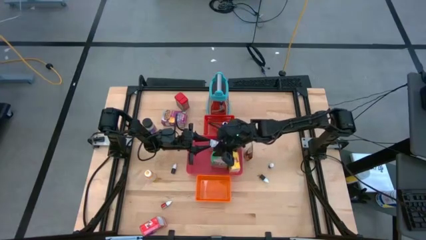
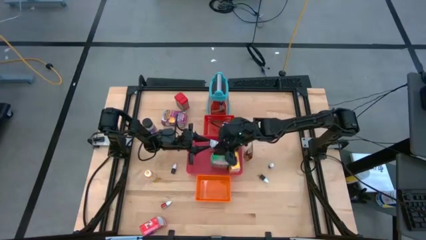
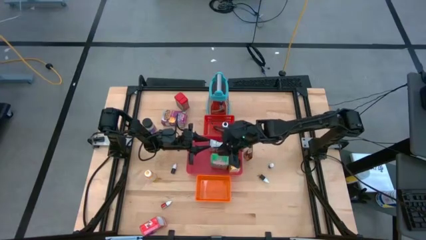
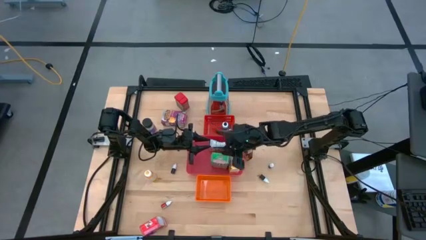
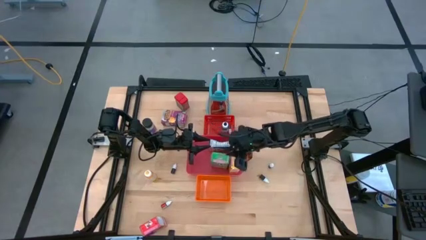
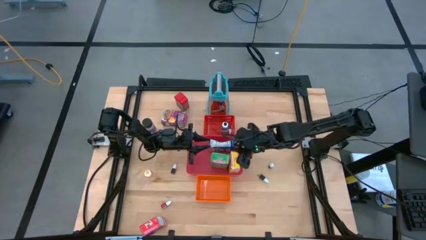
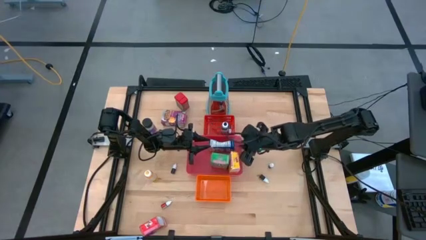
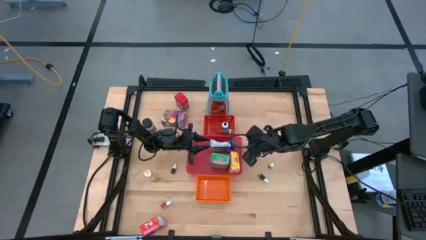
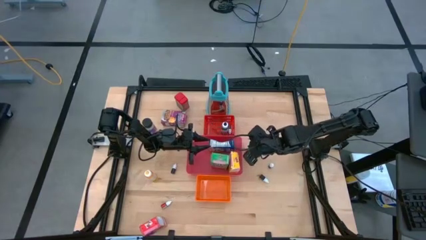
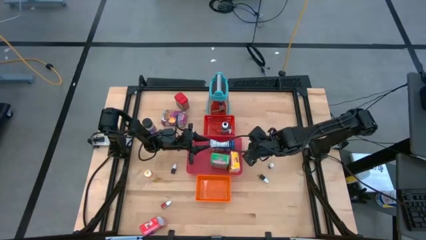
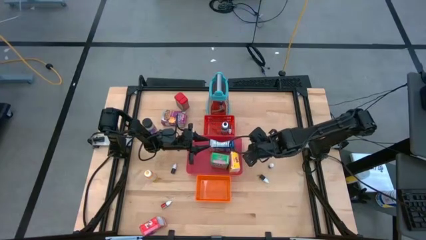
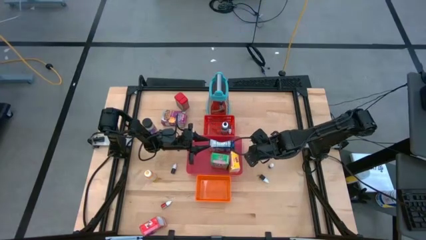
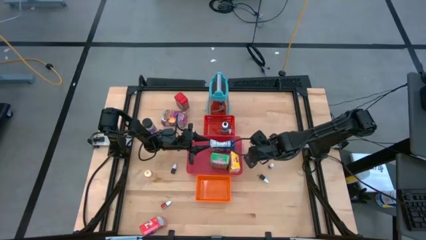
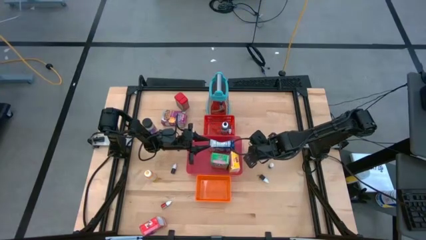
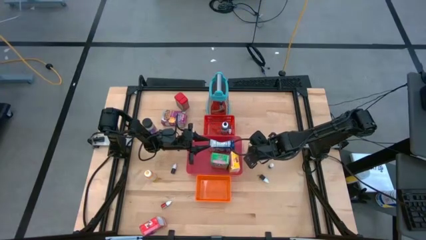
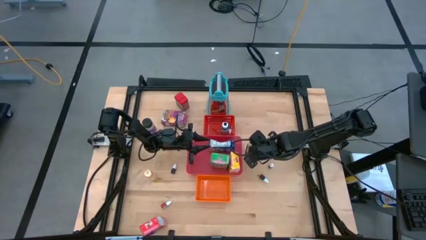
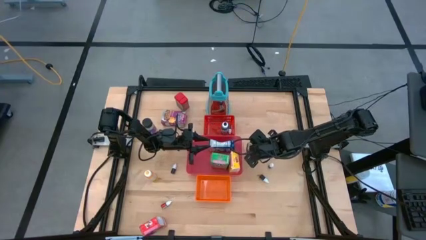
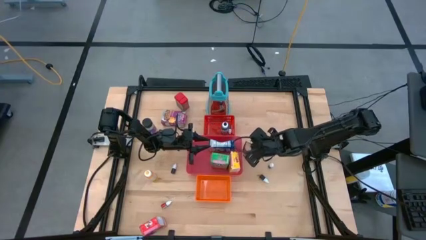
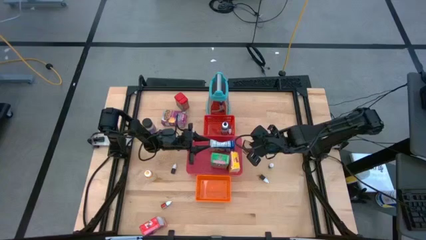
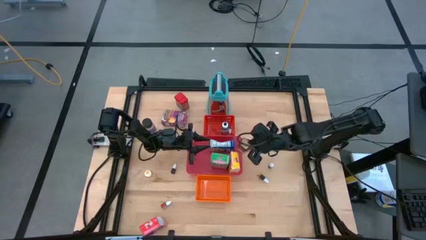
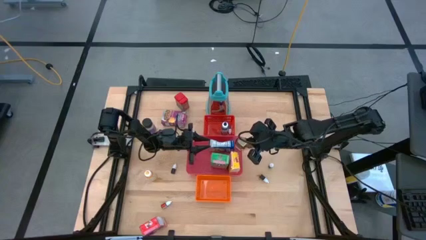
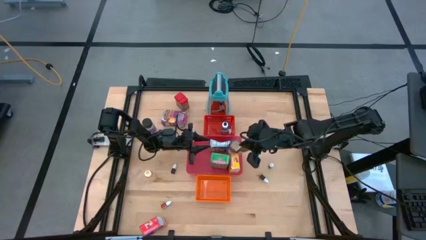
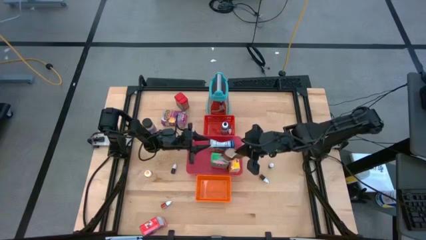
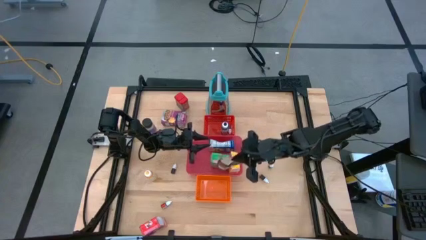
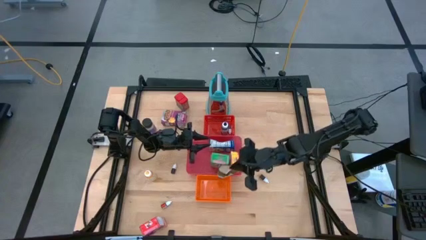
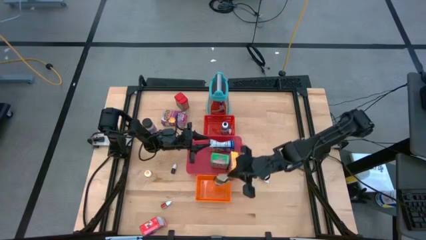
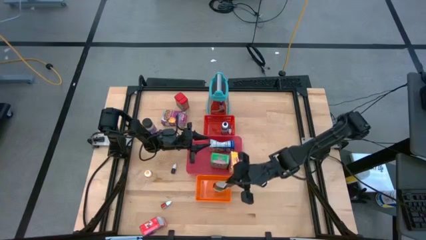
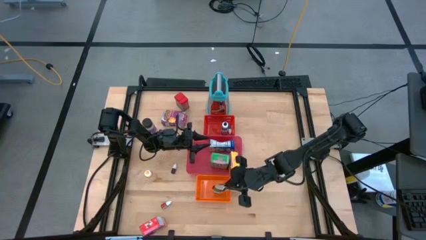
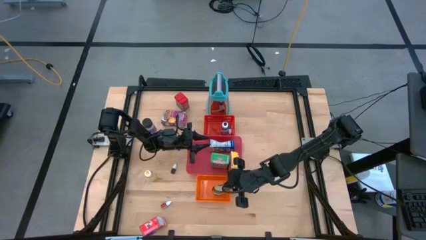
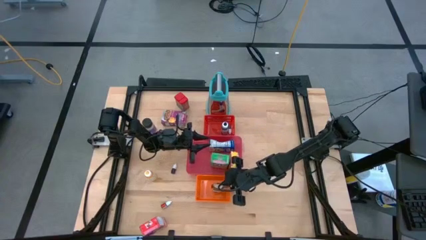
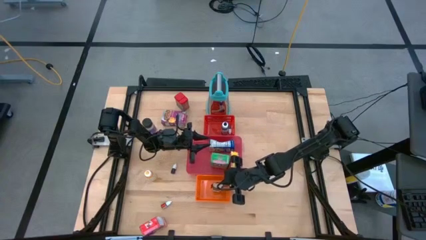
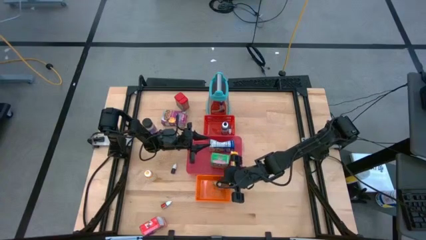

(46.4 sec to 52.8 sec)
Task: Pick & Place Kitchen Items
Put the orange seasoning bag into the orange bin

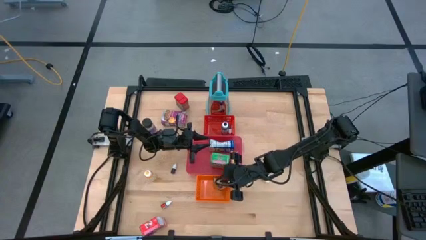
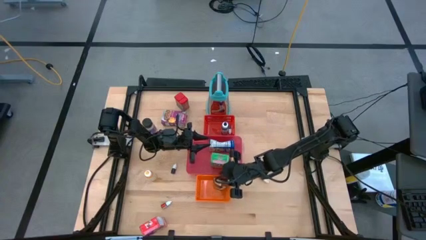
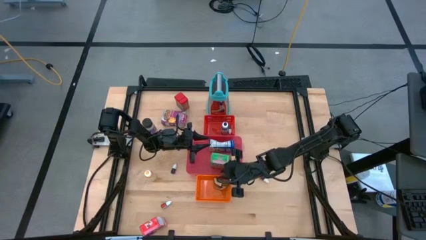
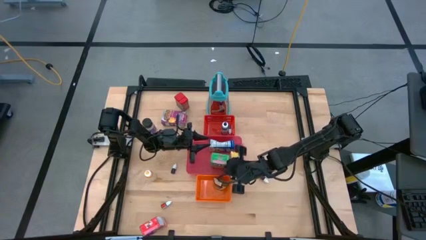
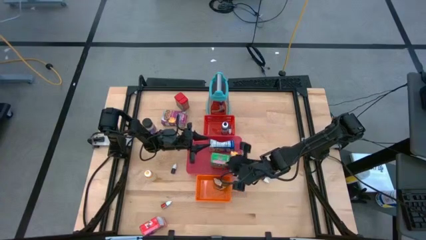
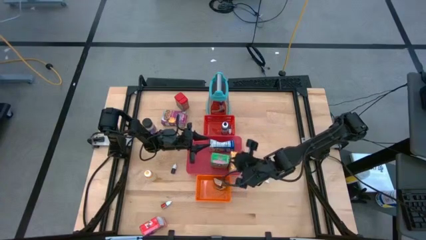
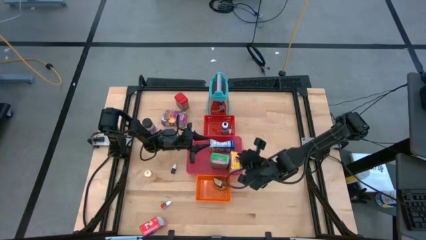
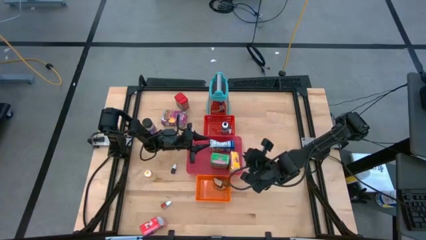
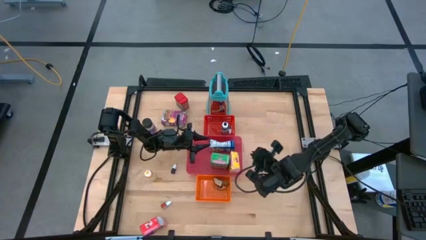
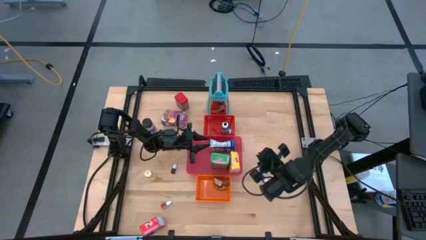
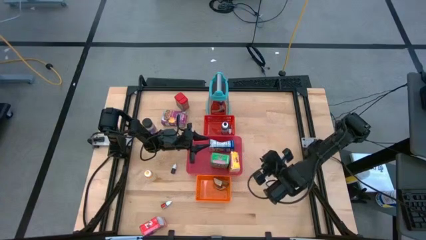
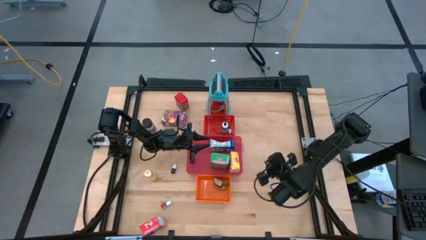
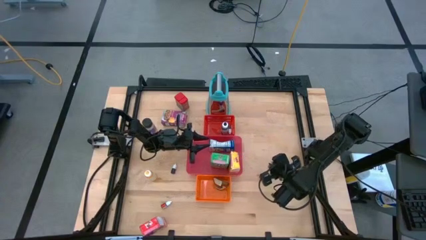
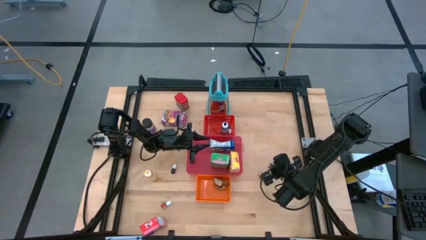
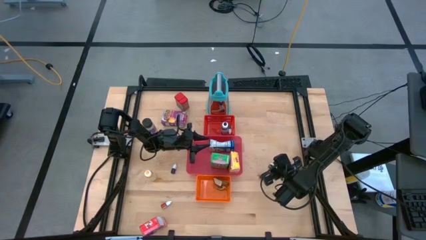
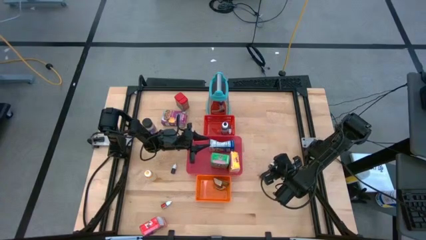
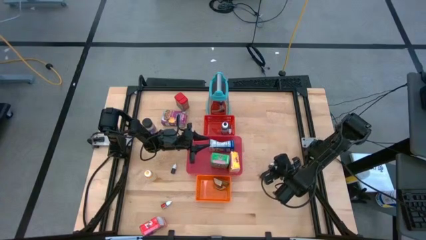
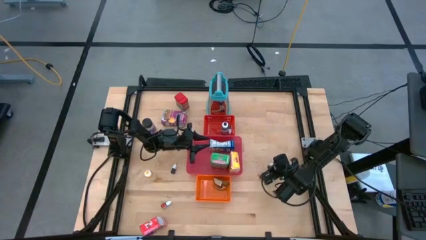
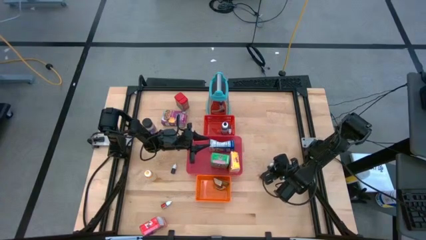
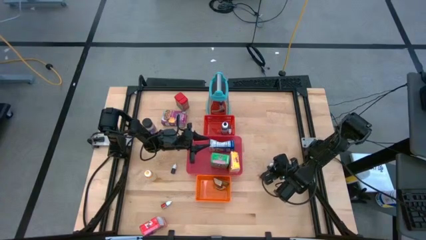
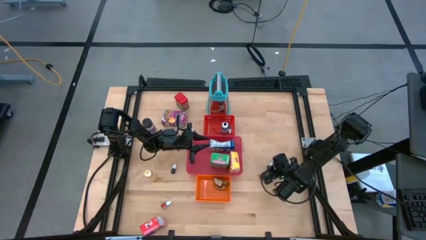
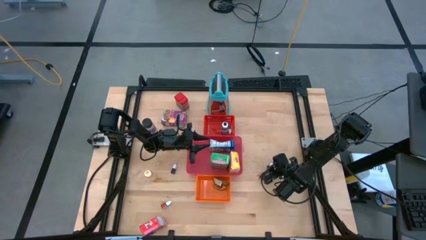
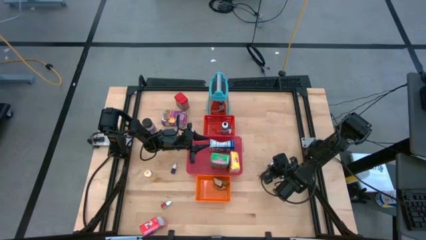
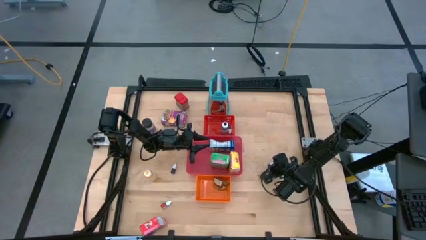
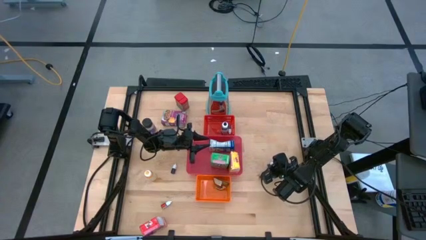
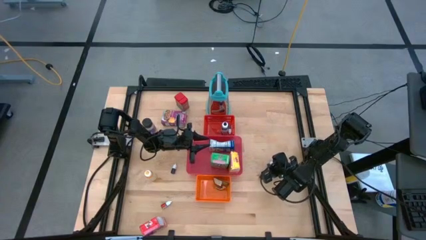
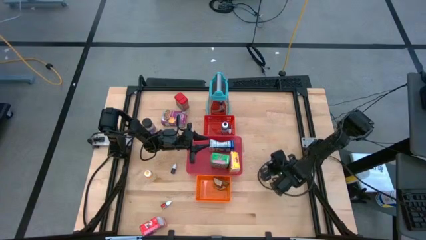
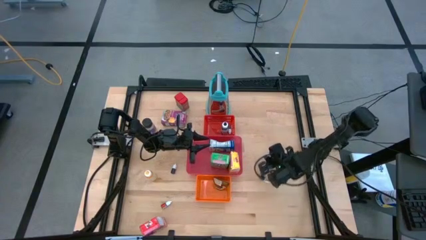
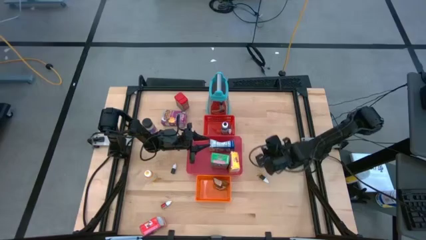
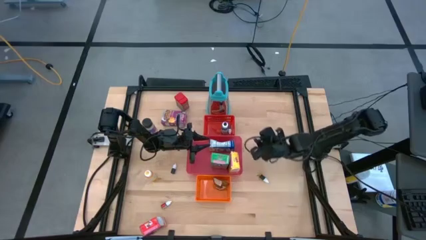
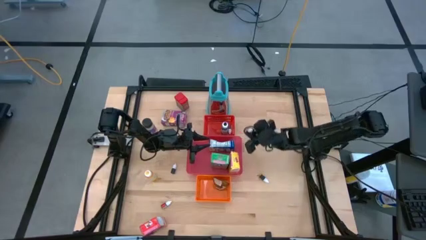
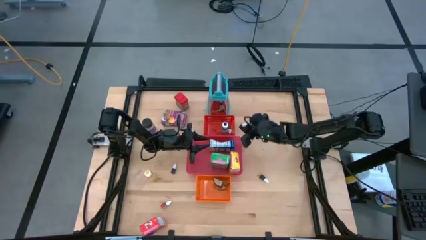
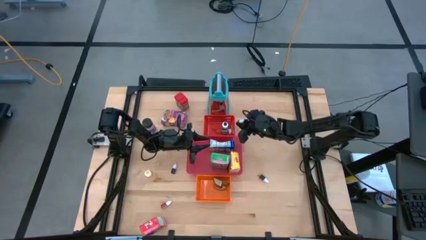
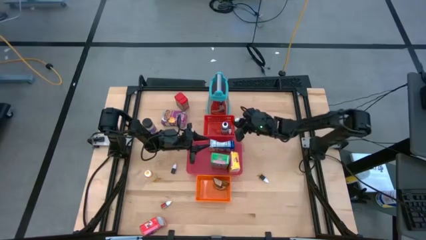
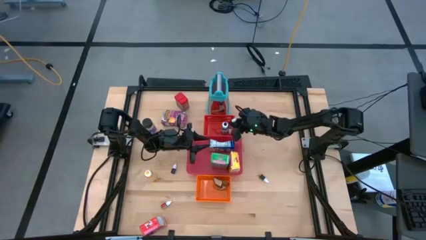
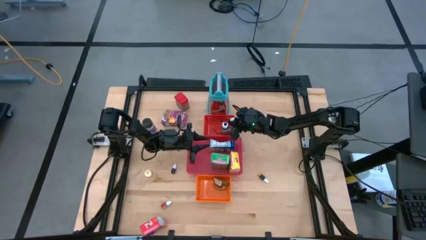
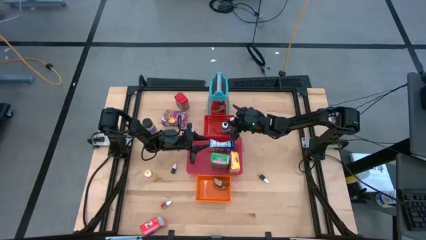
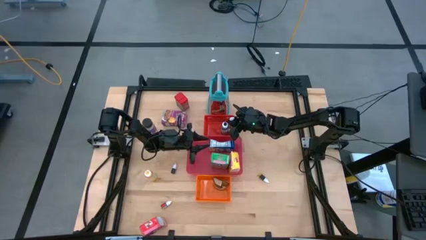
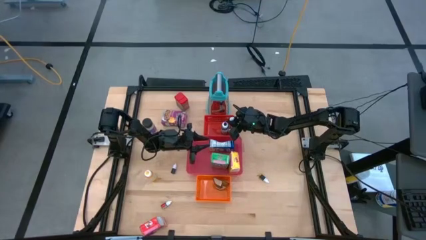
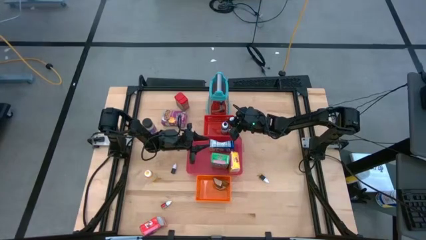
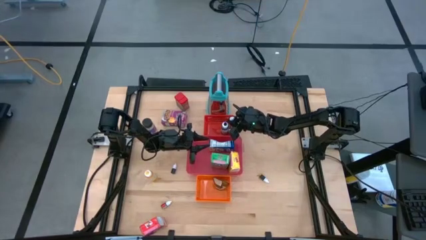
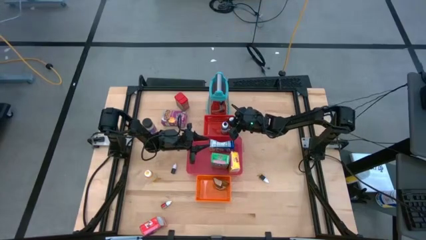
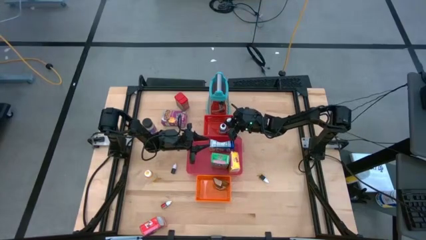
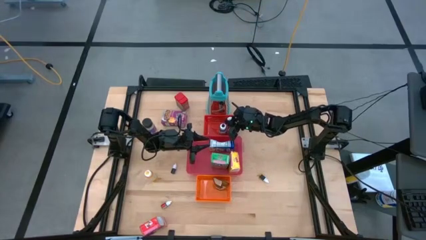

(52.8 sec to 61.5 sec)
Put the small green food coloring bottle into the red bin
